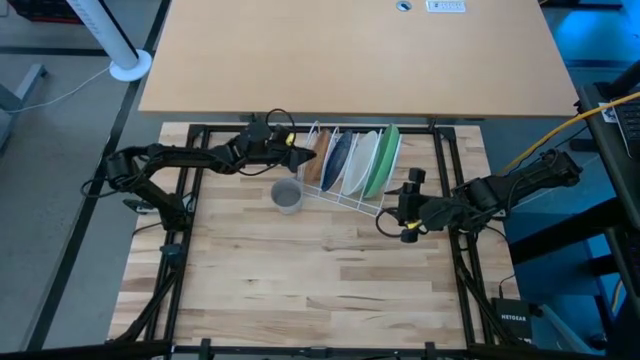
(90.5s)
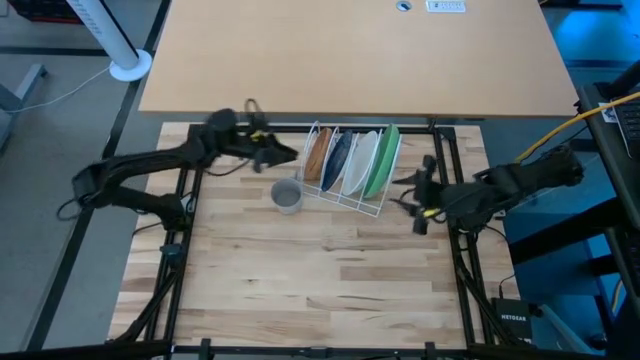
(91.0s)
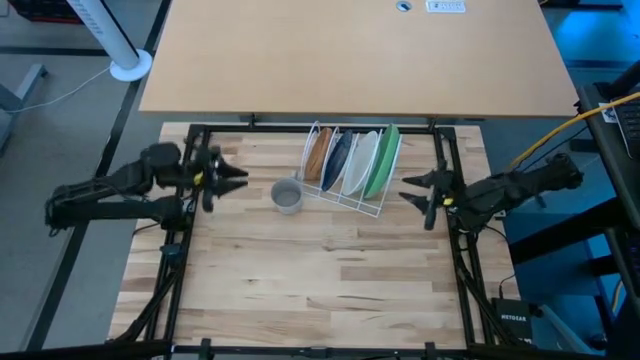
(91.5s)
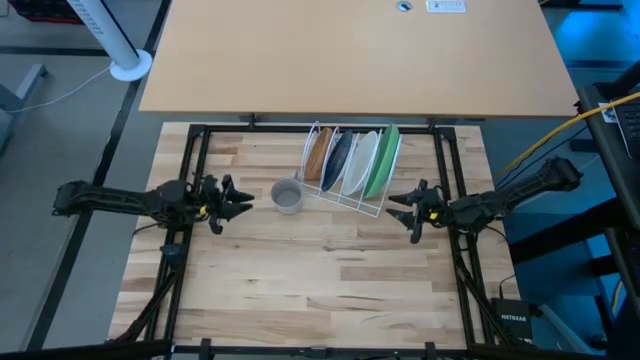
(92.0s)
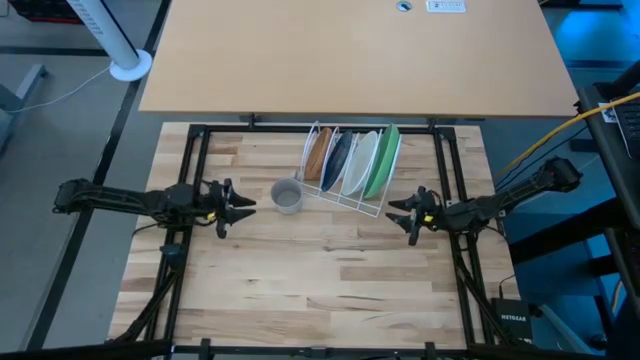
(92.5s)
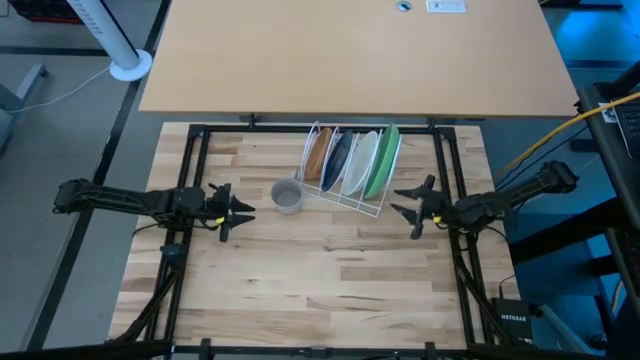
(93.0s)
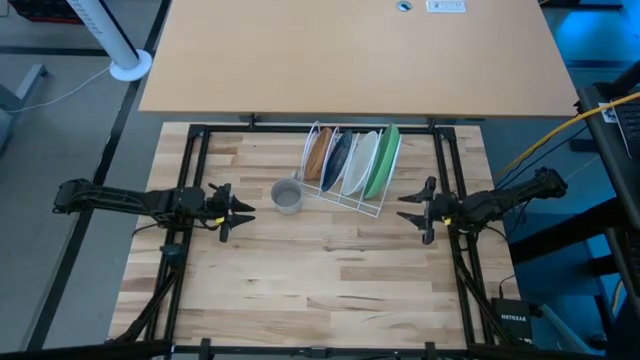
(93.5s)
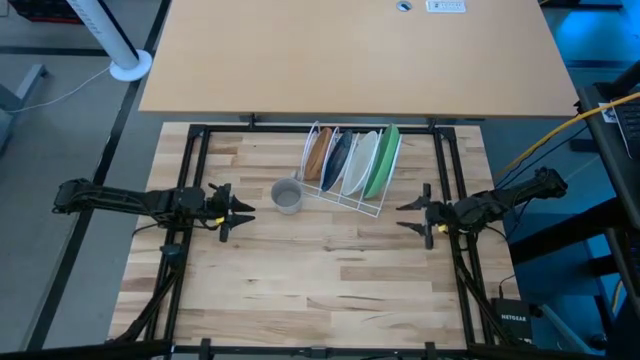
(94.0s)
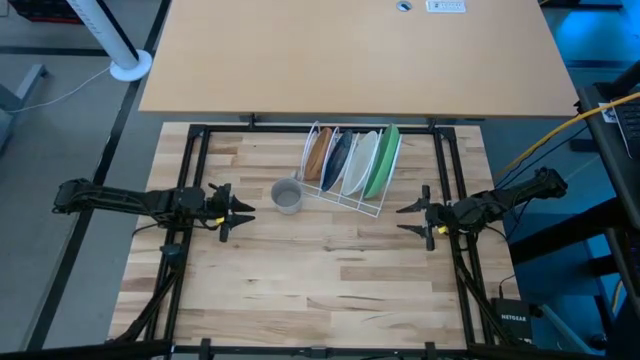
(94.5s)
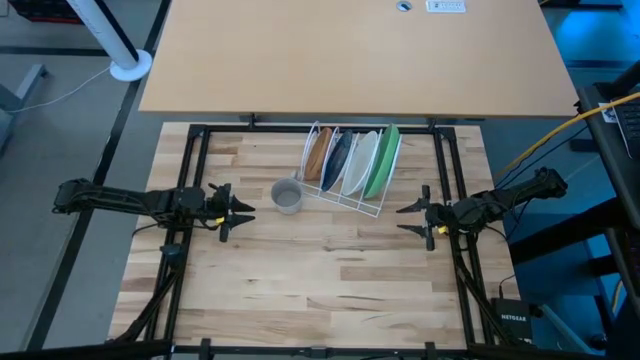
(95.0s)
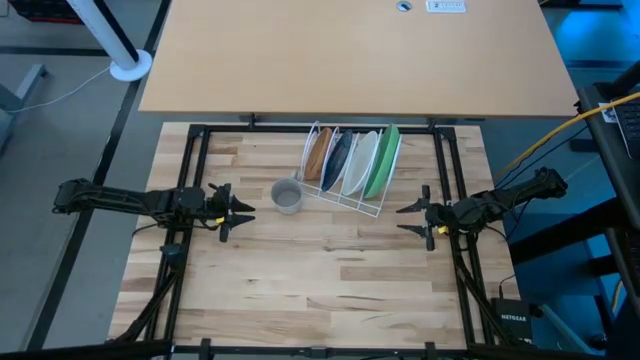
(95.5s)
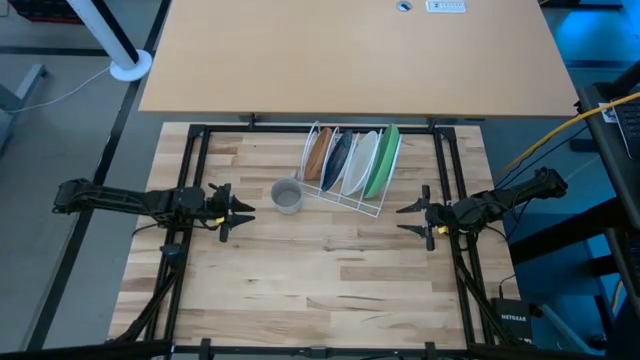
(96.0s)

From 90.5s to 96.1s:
Task: Sort dishes
Return to Home Position

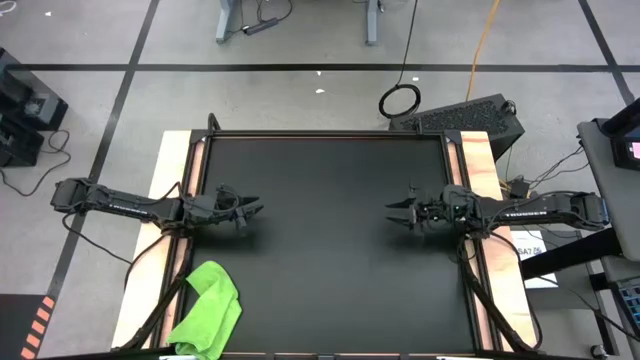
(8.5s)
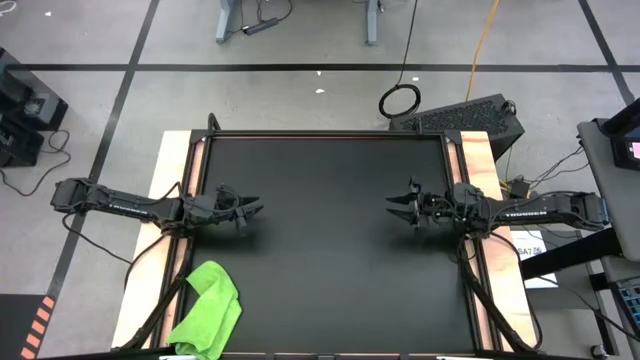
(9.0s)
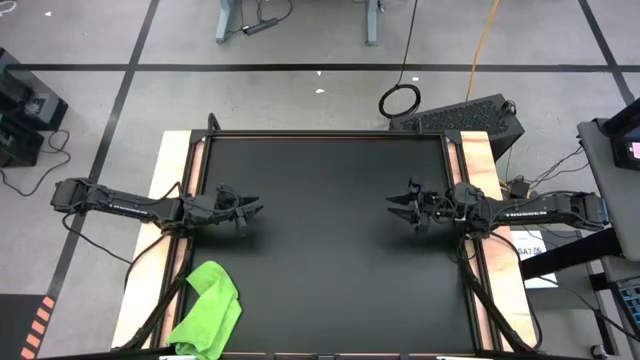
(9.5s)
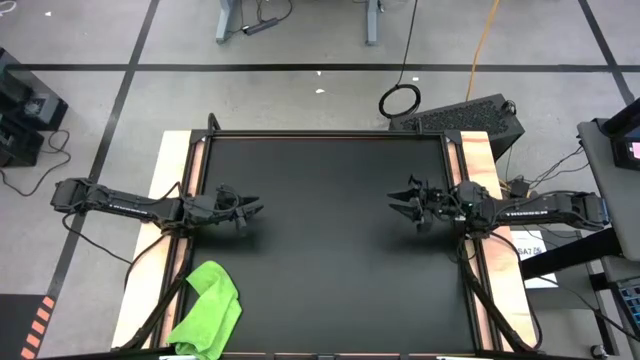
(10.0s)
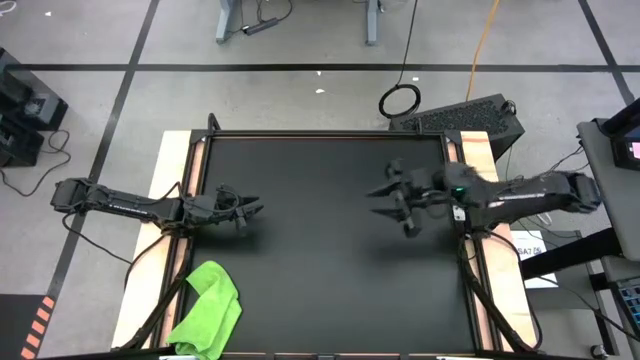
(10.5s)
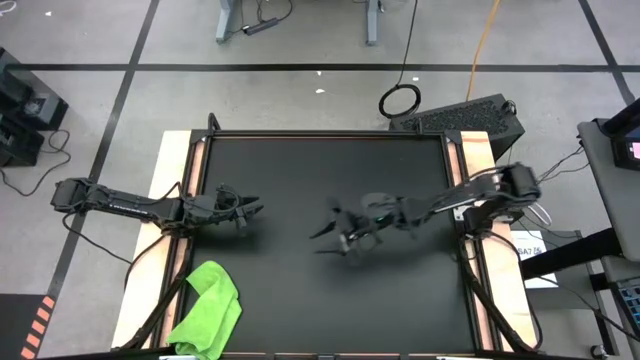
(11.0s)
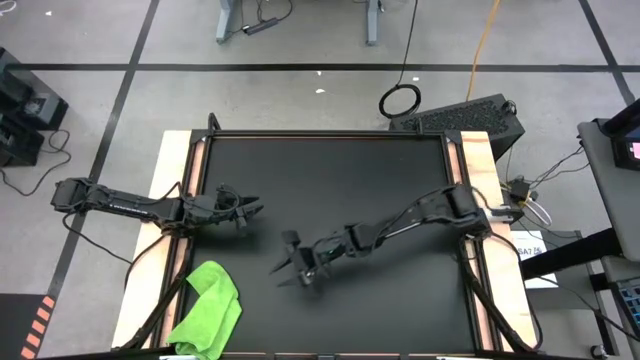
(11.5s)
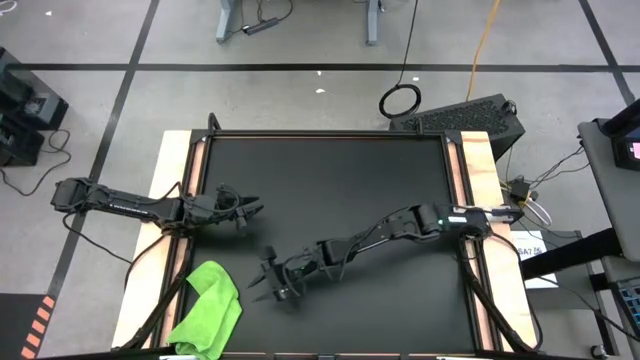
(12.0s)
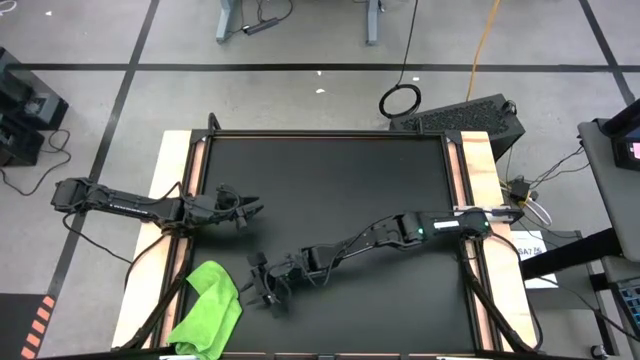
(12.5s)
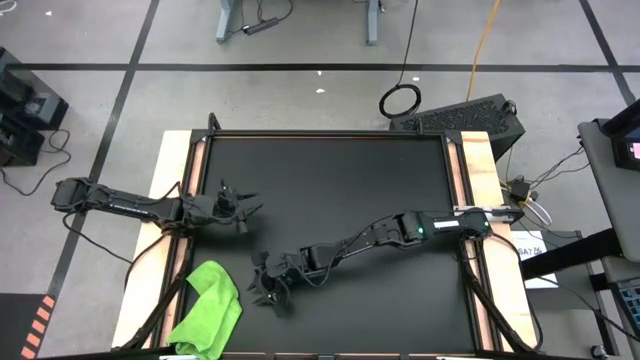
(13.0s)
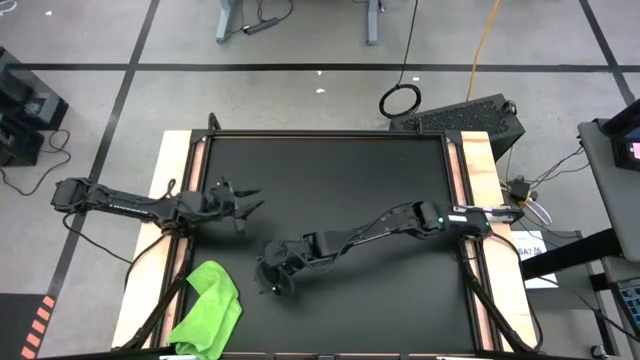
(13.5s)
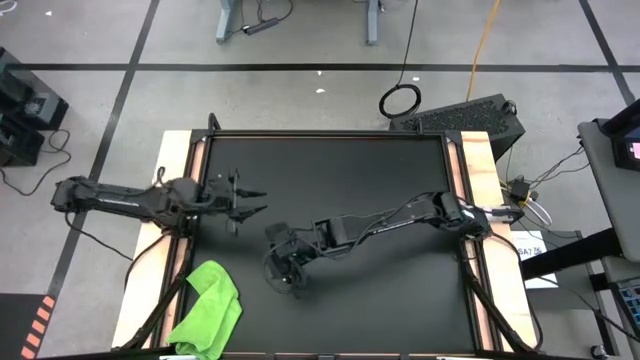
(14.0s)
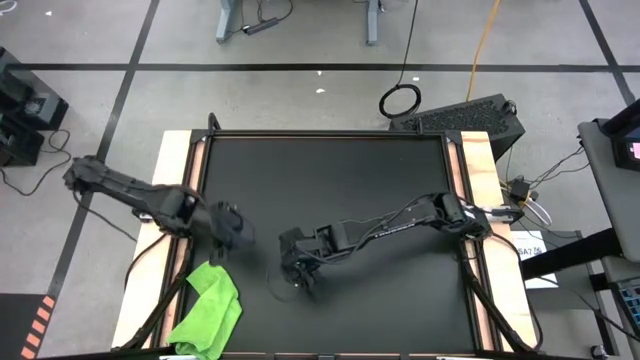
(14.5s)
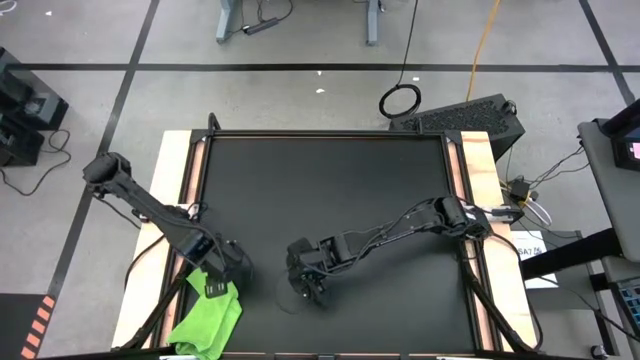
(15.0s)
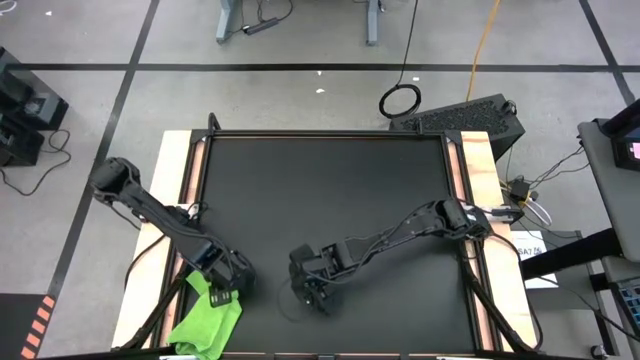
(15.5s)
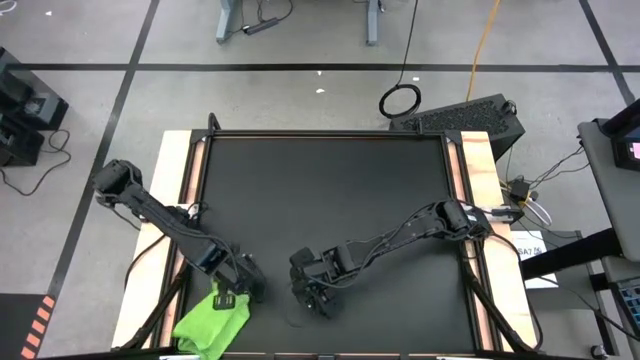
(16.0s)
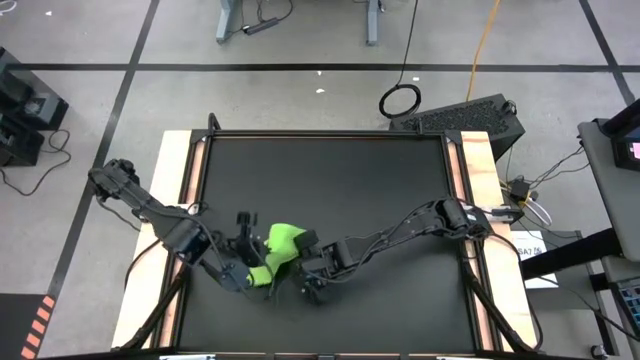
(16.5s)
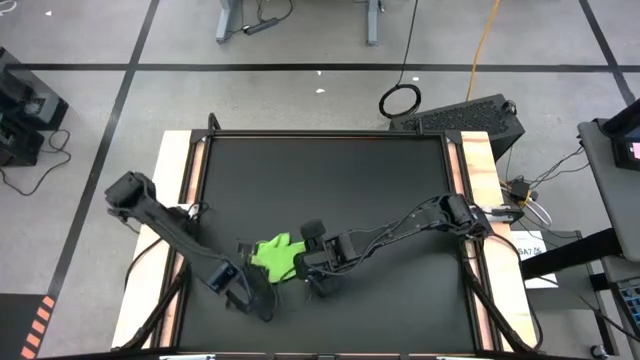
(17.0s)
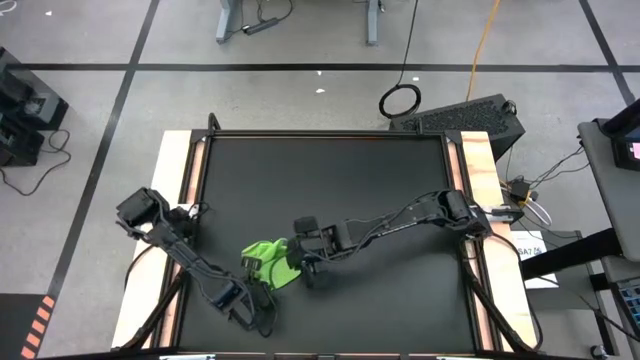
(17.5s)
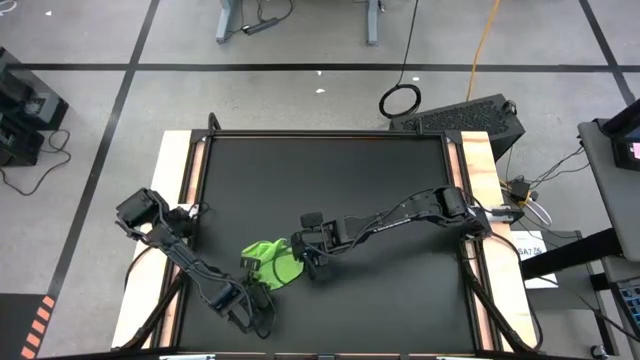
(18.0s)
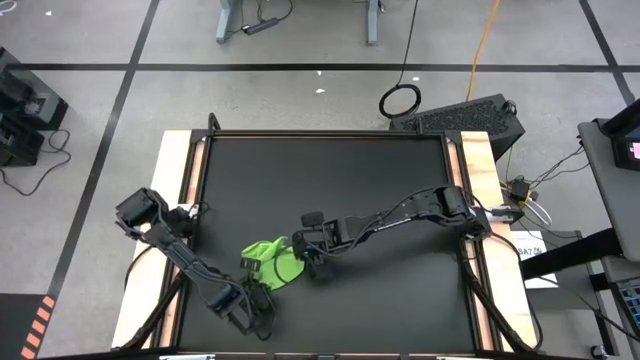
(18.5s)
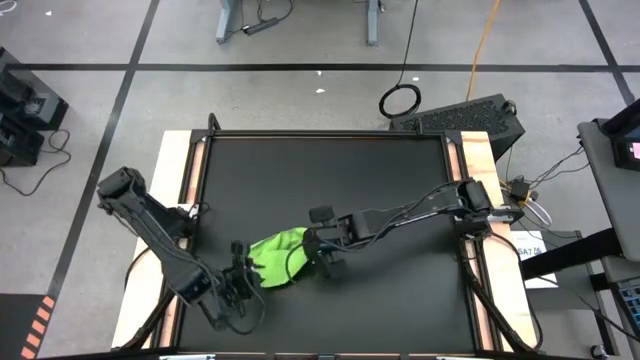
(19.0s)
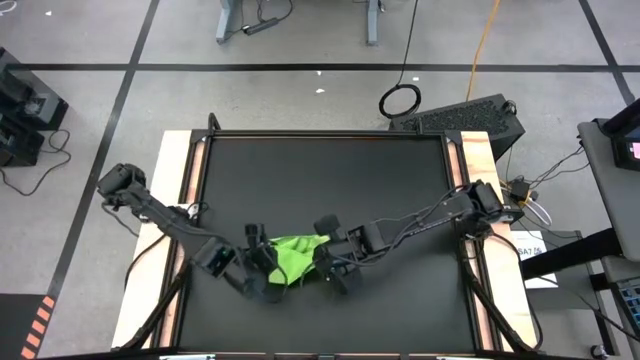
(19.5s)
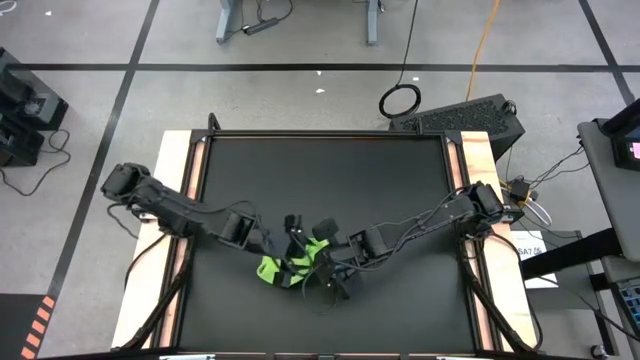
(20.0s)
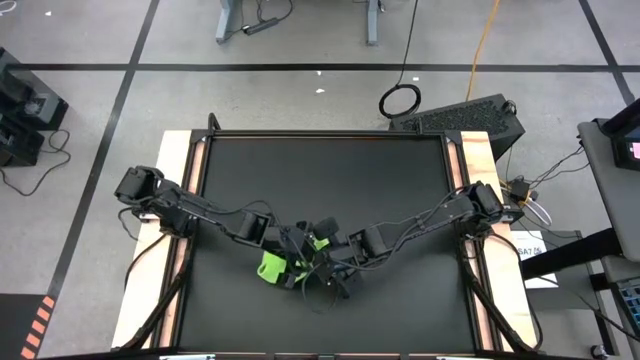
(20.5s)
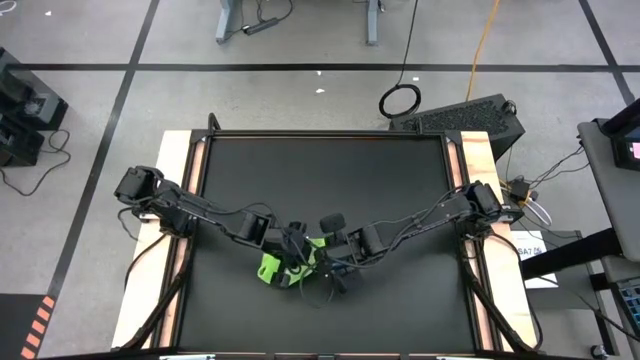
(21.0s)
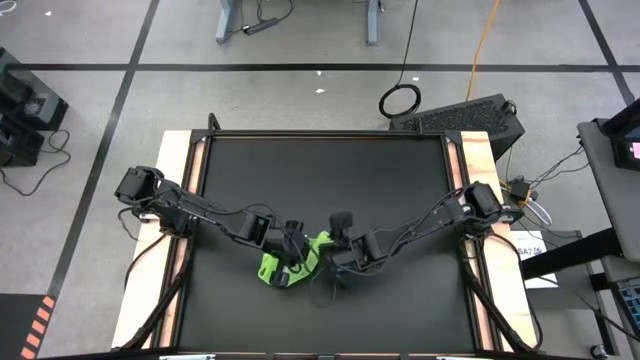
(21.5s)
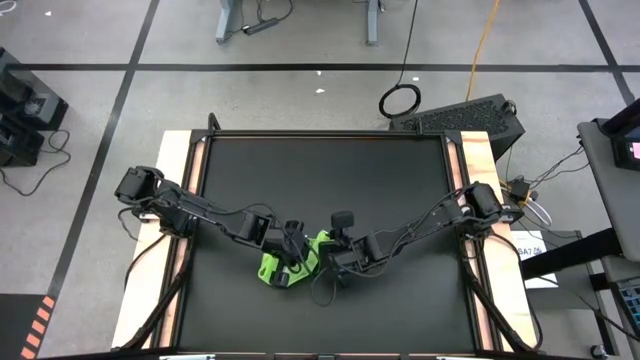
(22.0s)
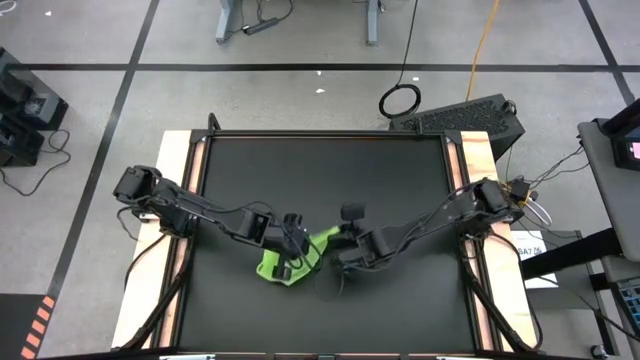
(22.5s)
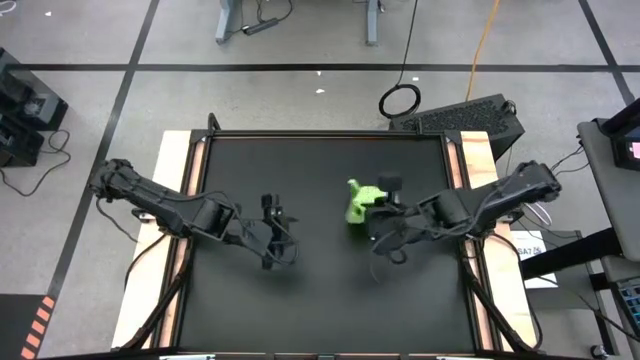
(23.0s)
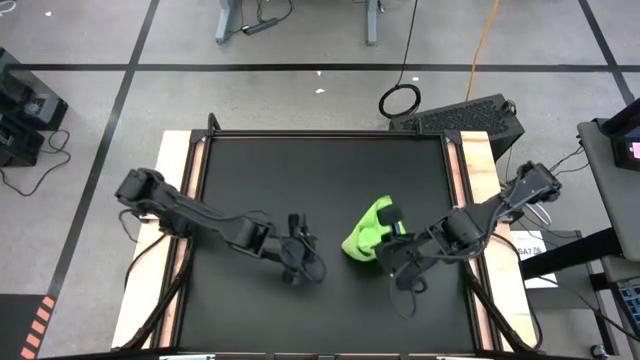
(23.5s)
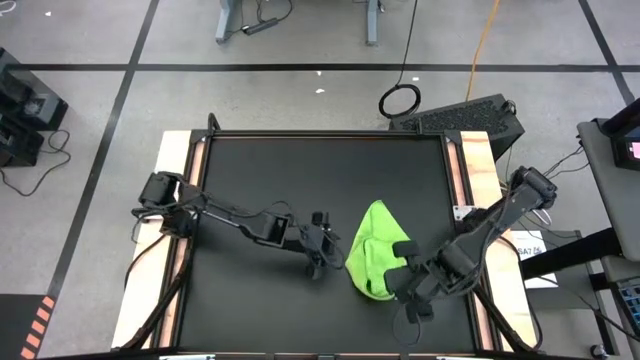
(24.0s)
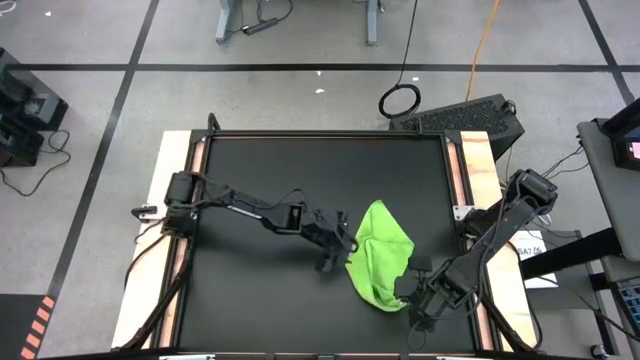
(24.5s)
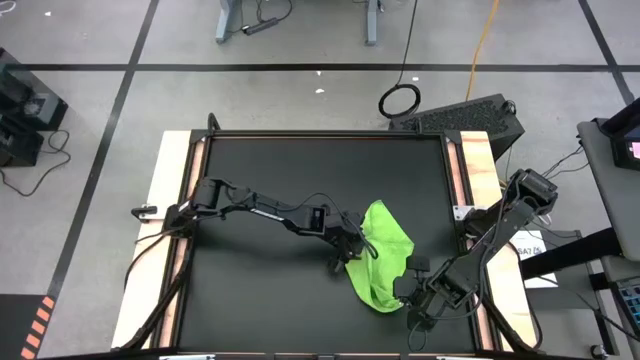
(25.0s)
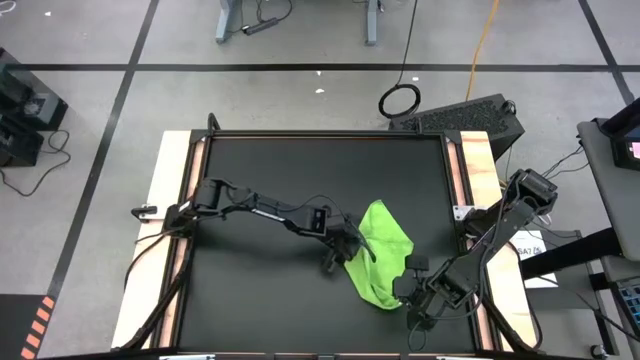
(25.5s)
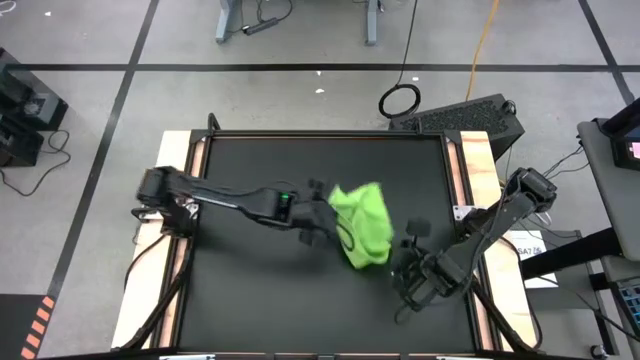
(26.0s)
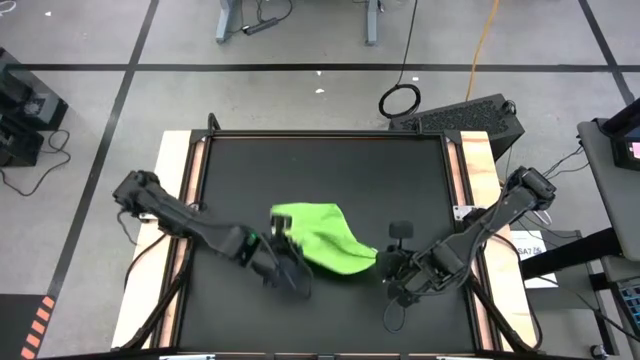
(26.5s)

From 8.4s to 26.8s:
Task: Roll towel
Fold the green towel on the table
